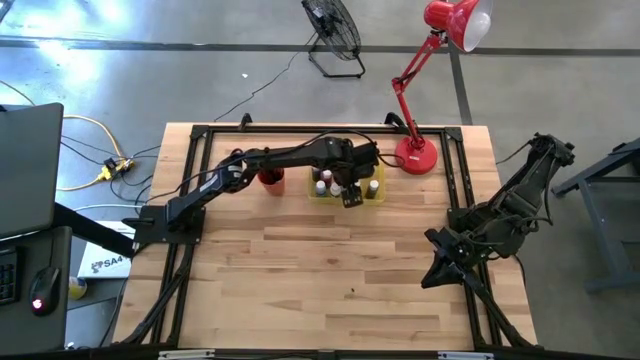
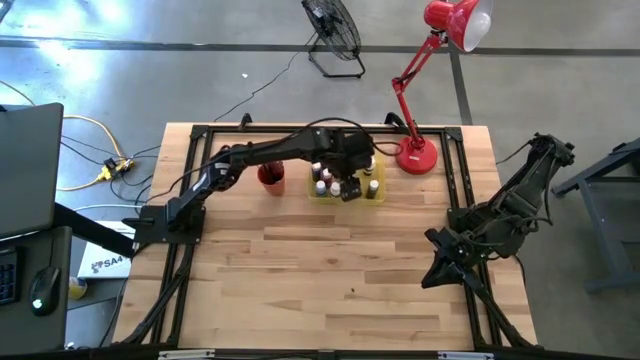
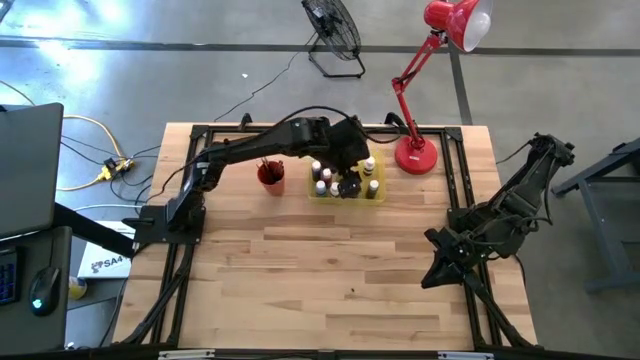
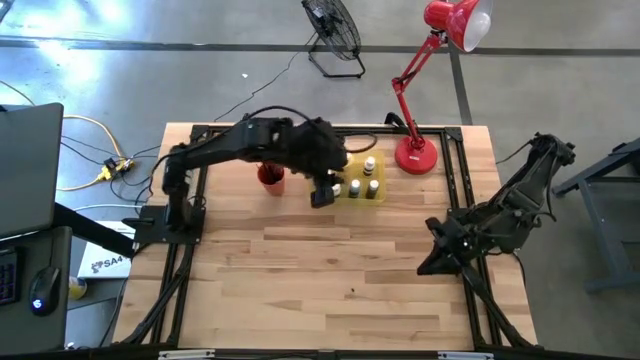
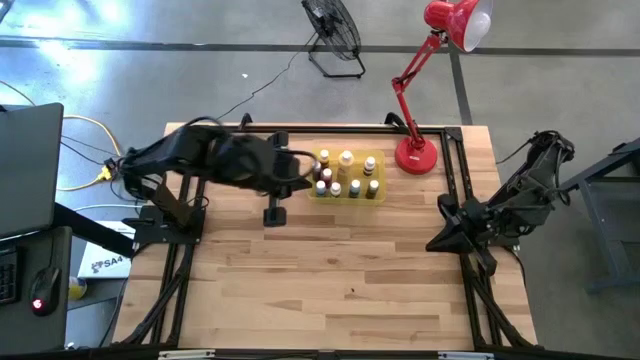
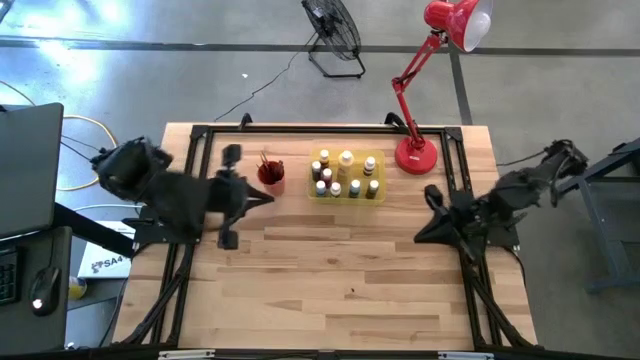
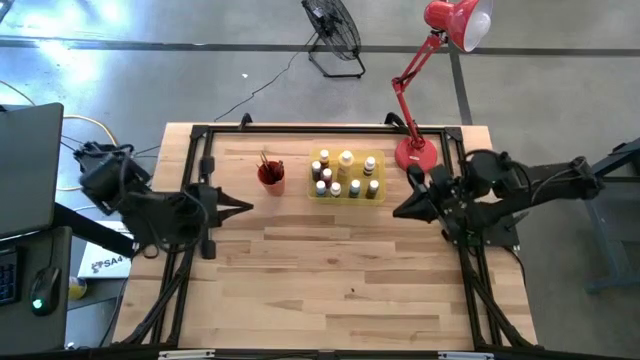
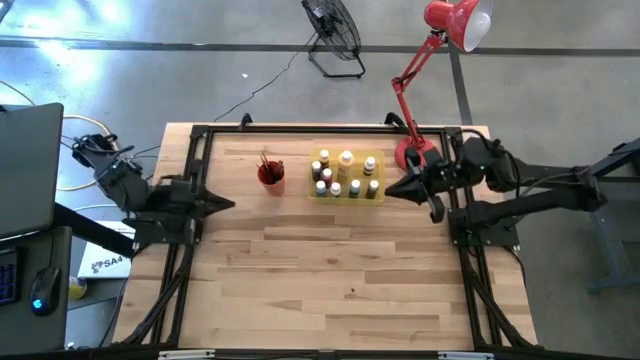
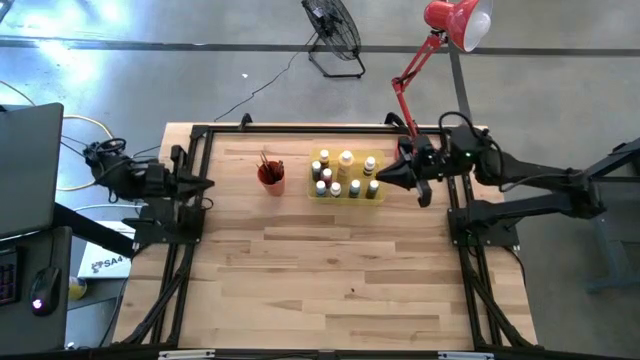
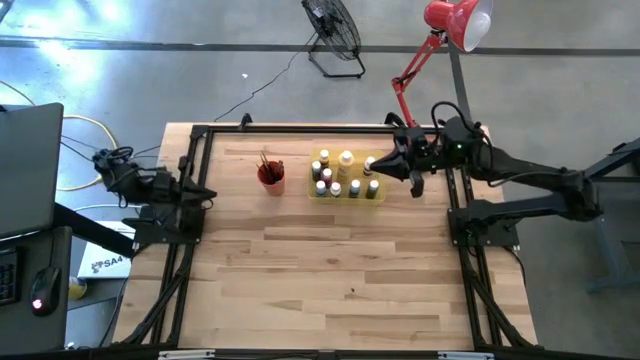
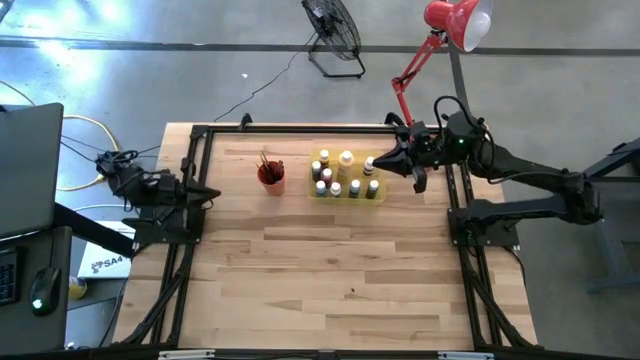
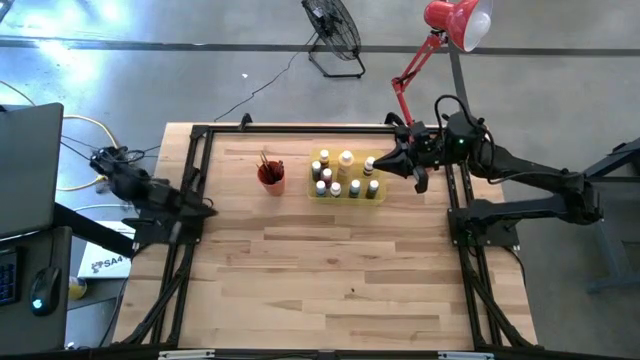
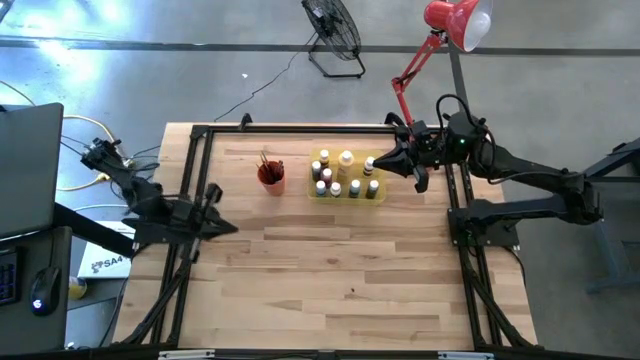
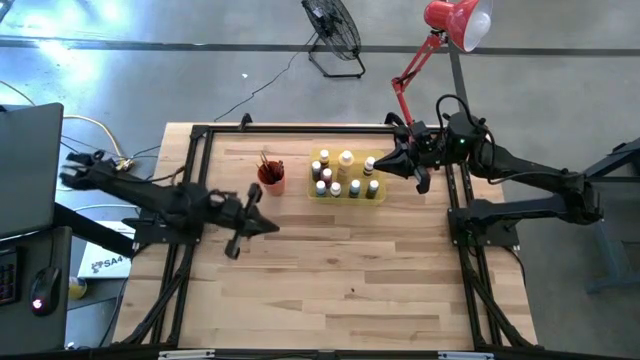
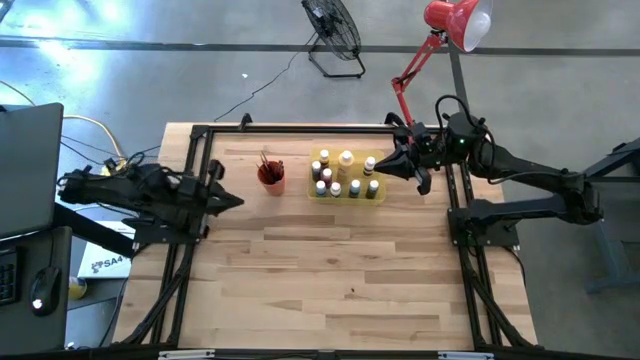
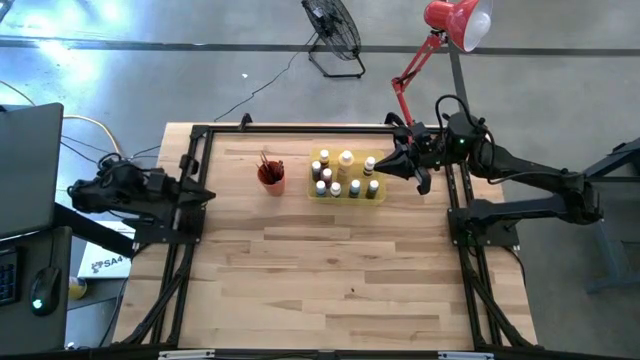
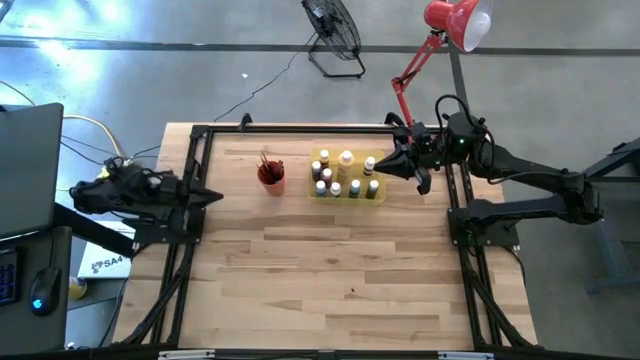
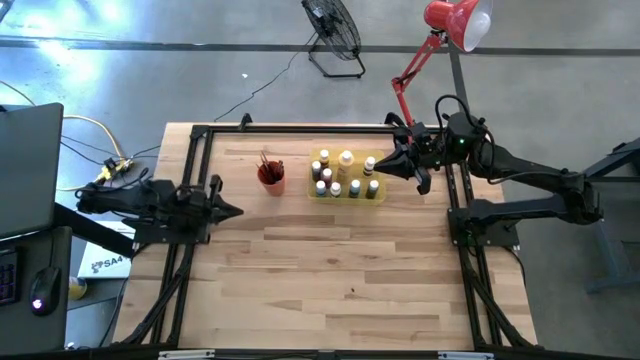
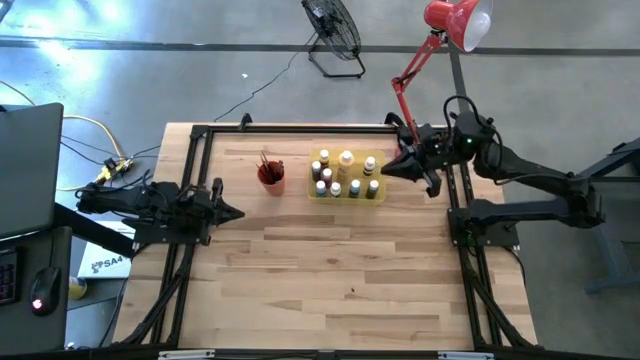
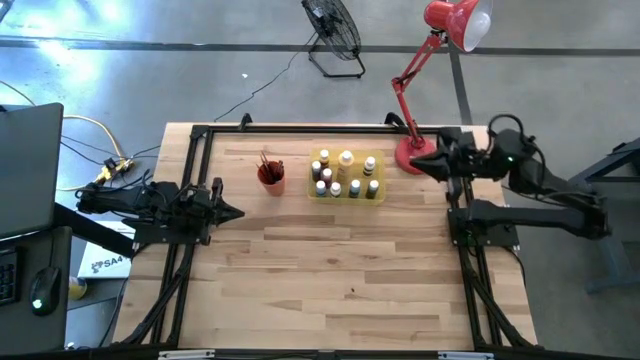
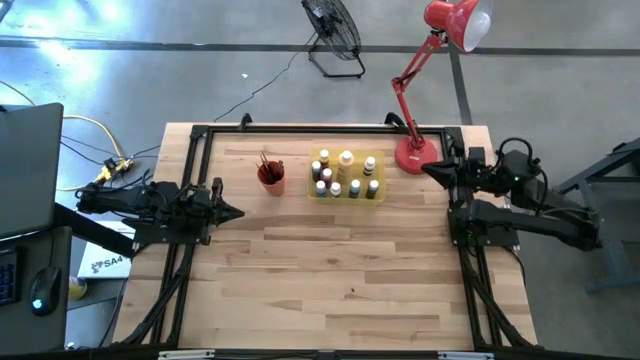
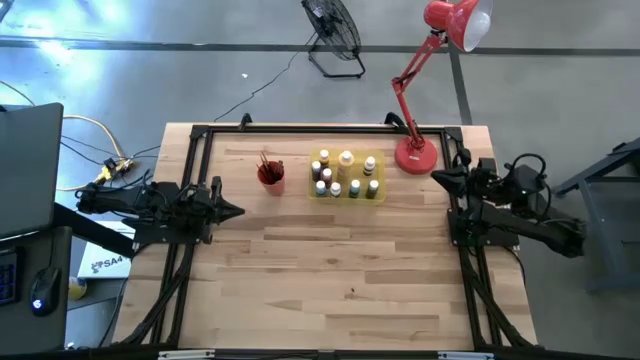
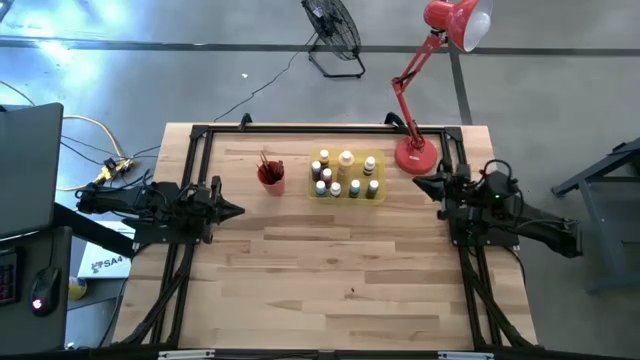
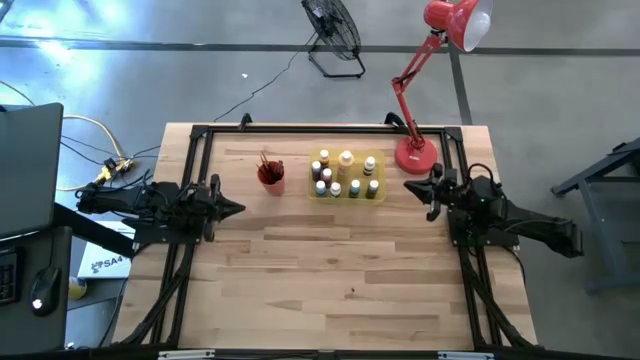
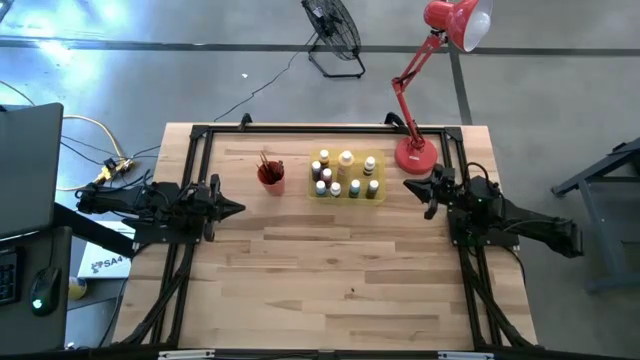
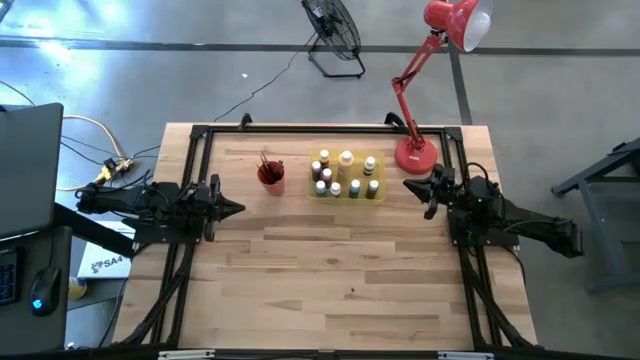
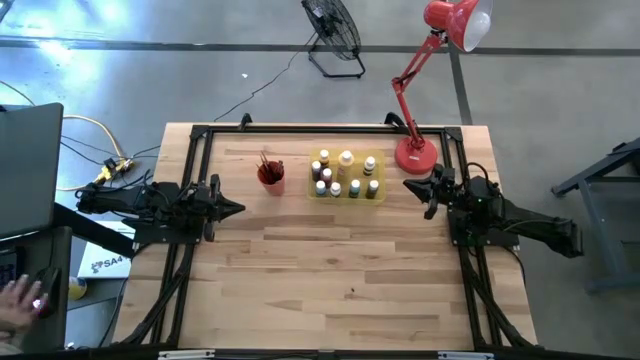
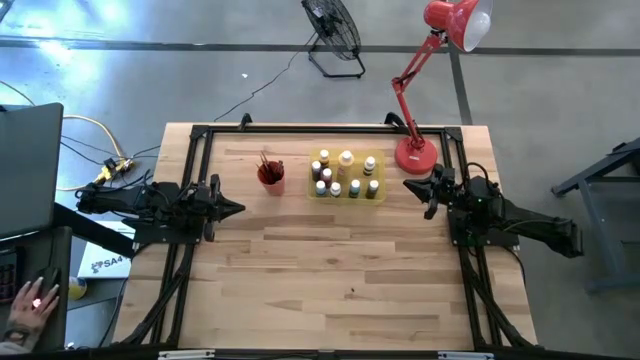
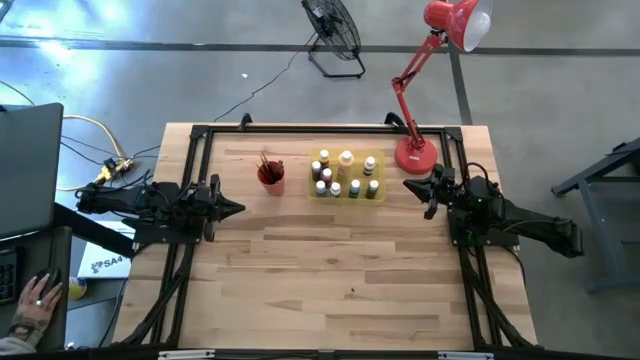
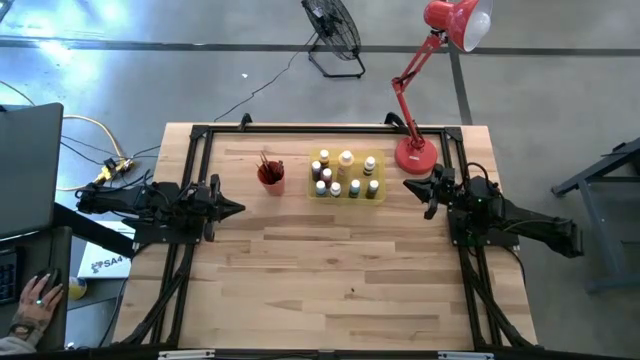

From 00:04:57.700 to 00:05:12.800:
Task: Pick & Place Paint Supplies
Return to Home Position

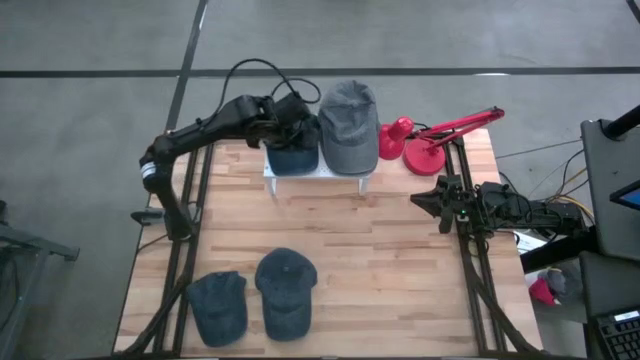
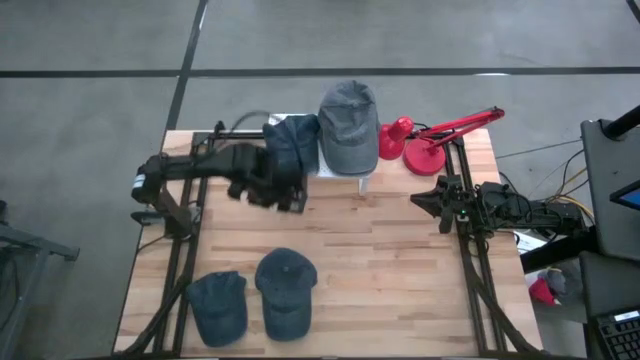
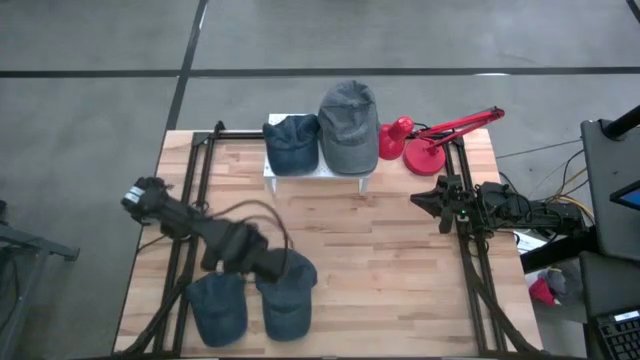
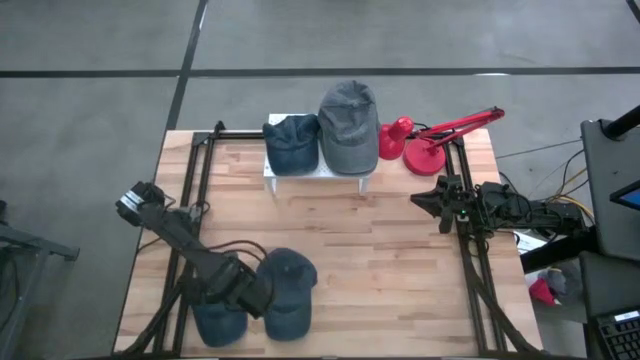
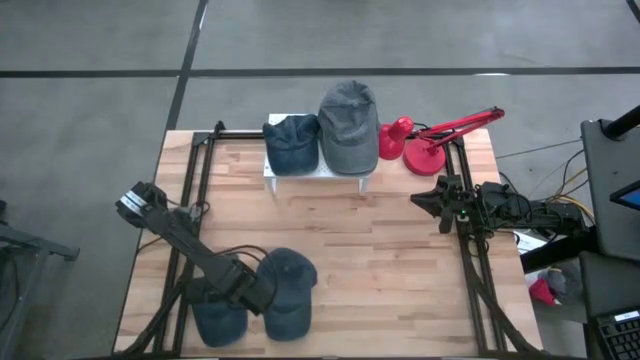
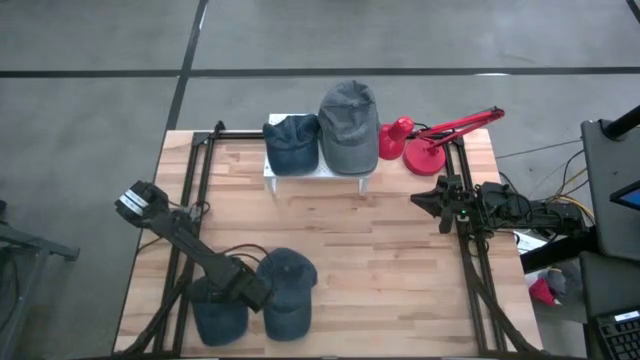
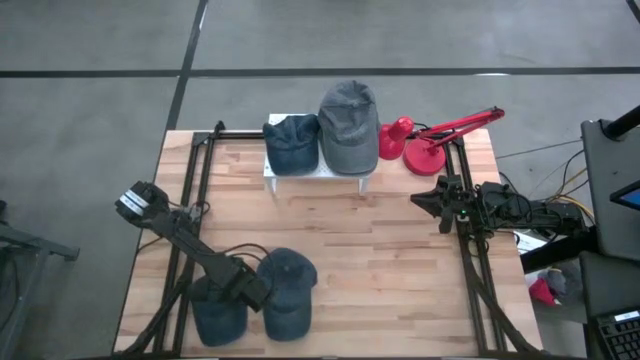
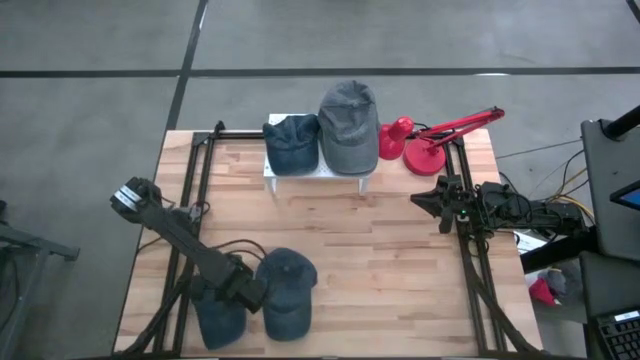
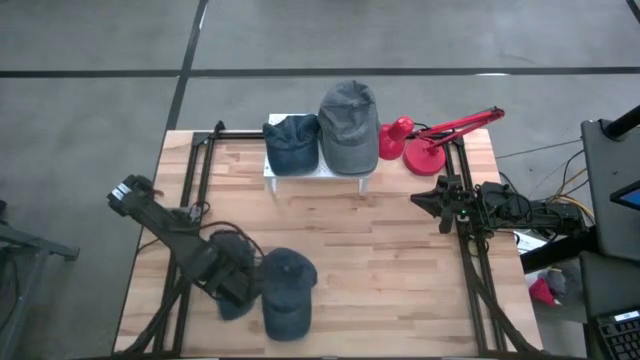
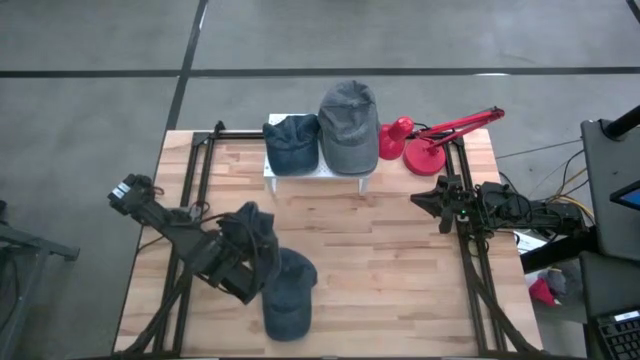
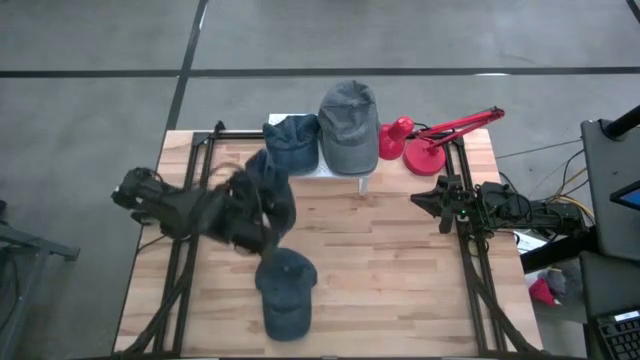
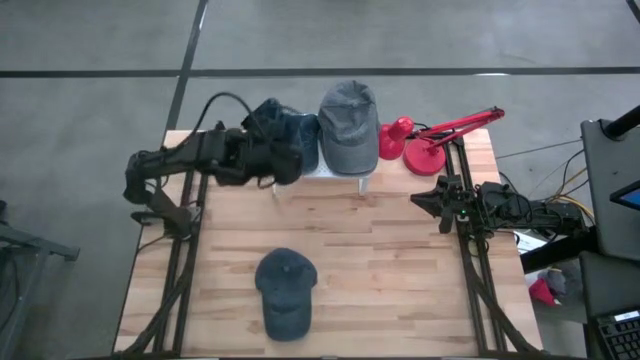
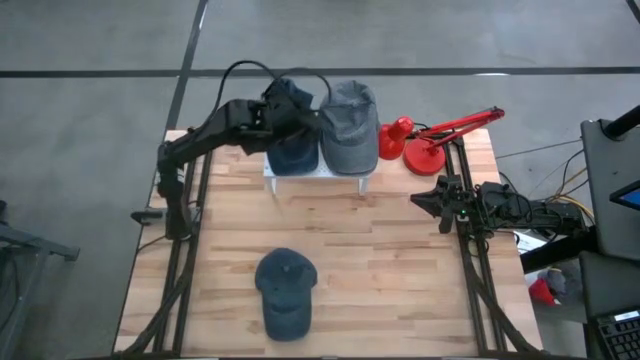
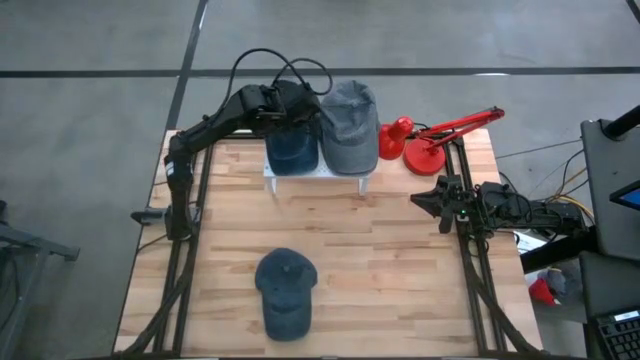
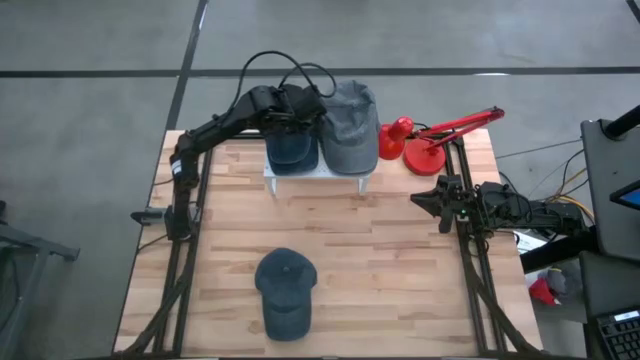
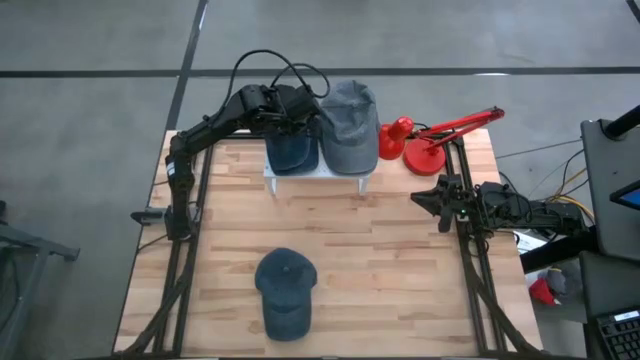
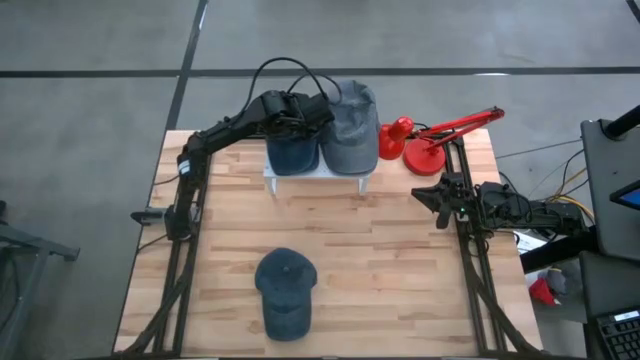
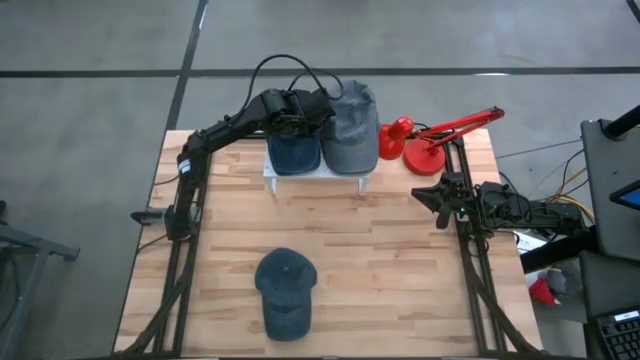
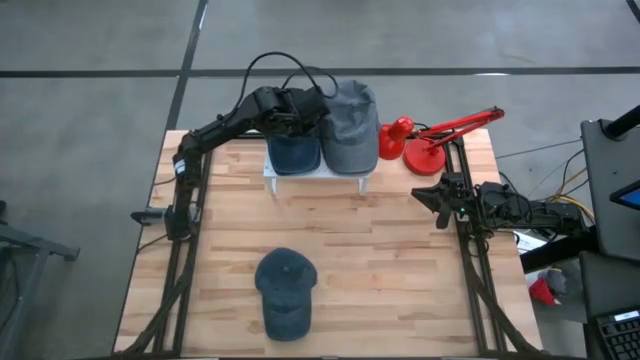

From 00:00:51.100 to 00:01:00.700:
Task: Pick & Place hat
Stack the left blue cap on top of the blue cap on the shelf
